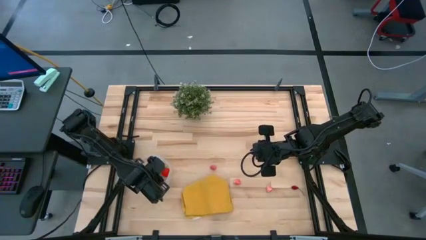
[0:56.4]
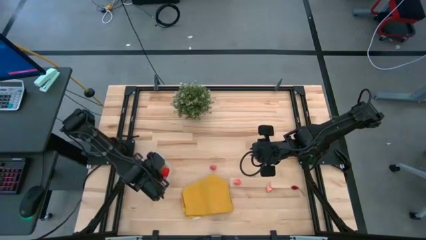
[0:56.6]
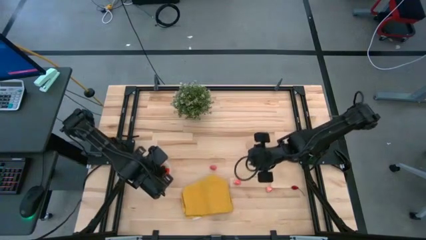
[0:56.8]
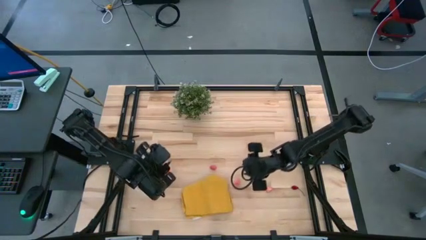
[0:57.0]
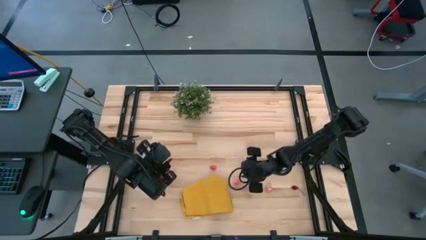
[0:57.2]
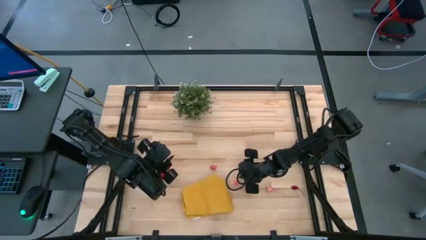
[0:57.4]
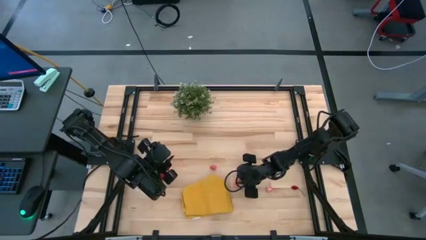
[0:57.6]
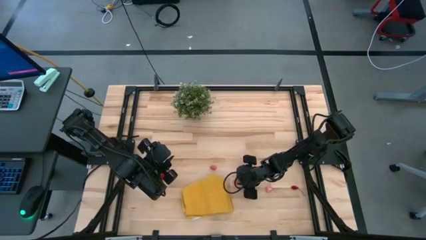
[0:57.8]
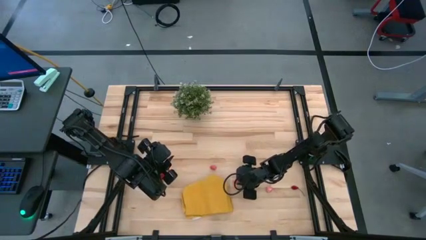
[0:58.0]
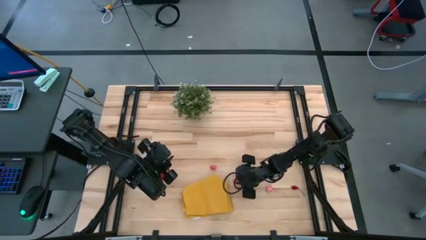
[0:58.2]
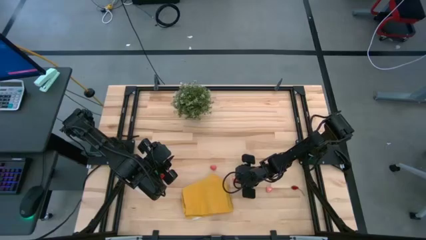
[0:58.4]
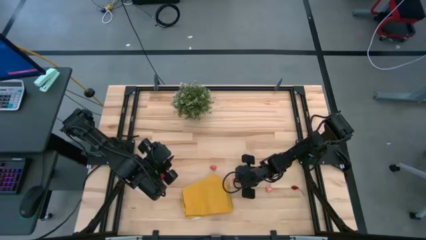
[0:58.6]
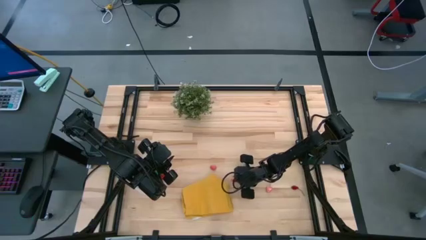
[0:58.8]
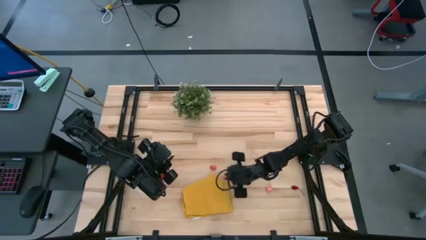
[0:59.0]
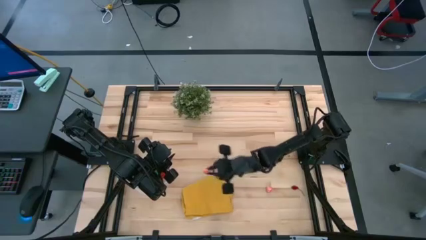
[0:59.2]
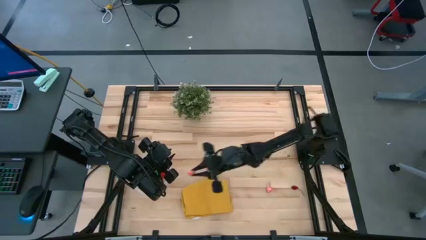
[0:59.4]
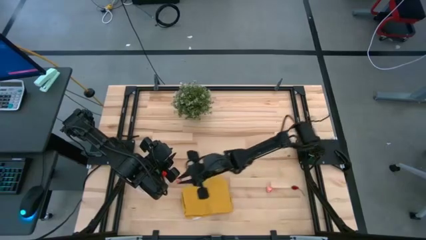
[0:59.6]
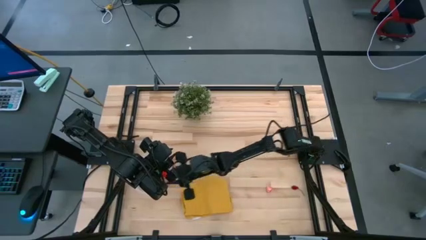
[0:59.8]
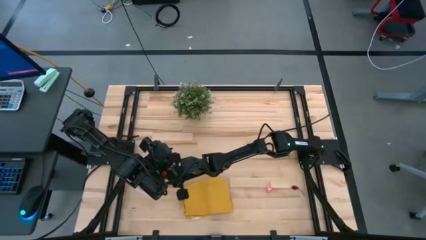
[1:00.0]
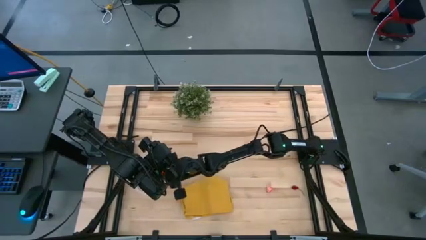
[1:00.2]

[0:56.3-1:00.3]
Task: Pick and placing Produce into tupperware
Put the peach into the transparent bin

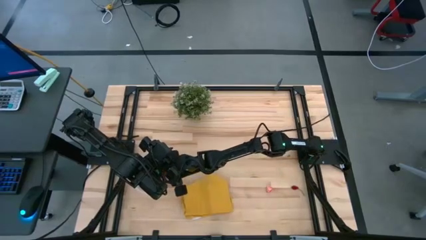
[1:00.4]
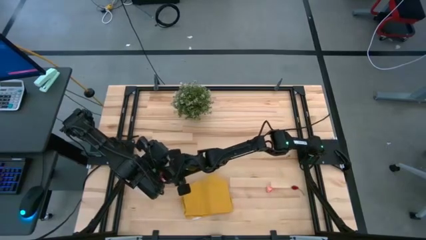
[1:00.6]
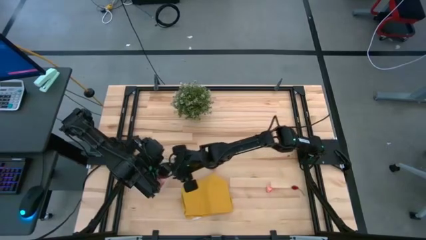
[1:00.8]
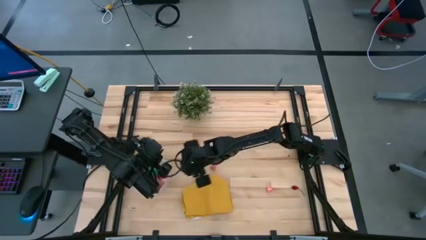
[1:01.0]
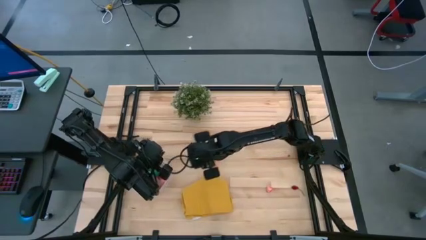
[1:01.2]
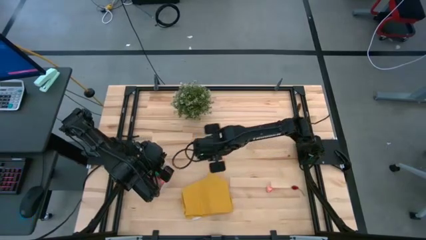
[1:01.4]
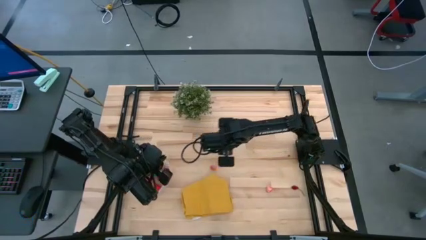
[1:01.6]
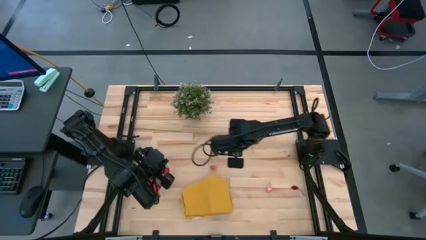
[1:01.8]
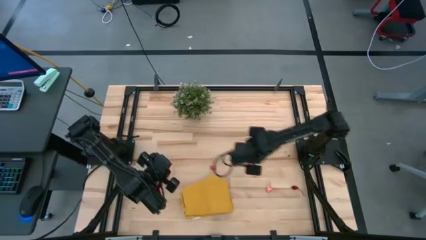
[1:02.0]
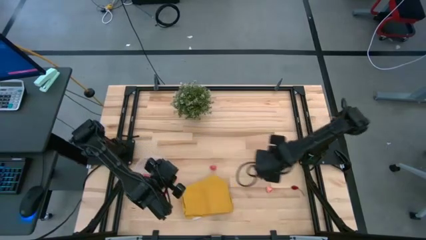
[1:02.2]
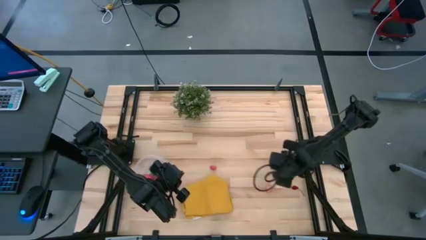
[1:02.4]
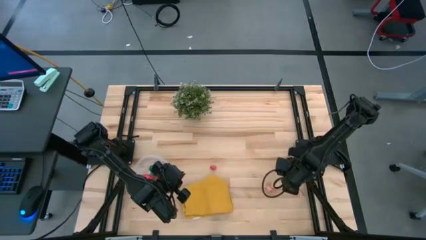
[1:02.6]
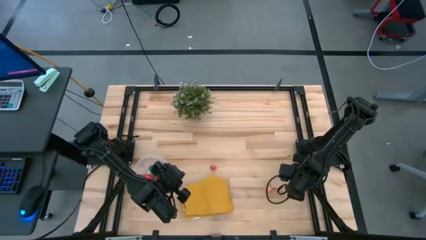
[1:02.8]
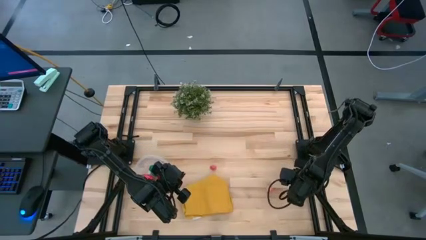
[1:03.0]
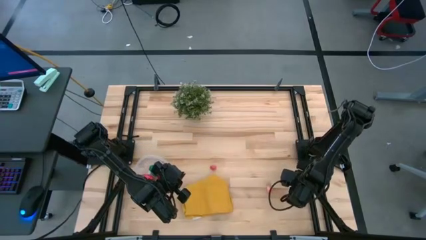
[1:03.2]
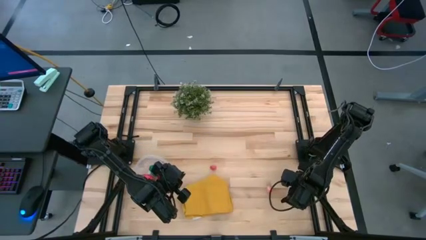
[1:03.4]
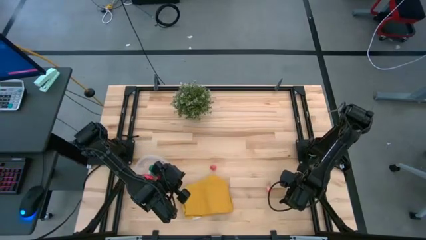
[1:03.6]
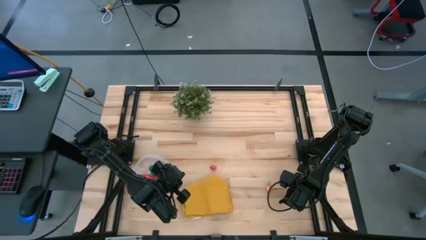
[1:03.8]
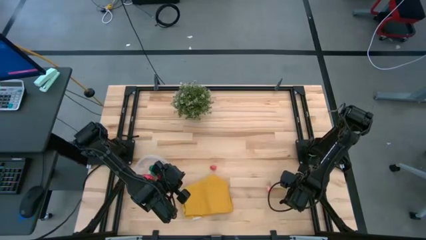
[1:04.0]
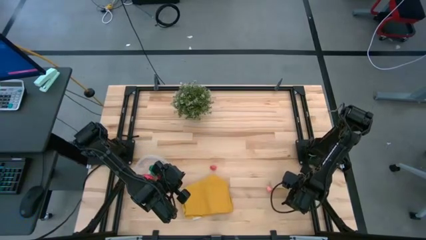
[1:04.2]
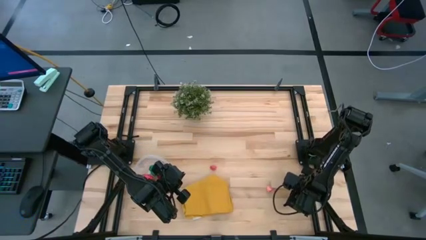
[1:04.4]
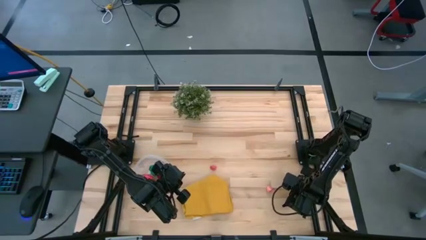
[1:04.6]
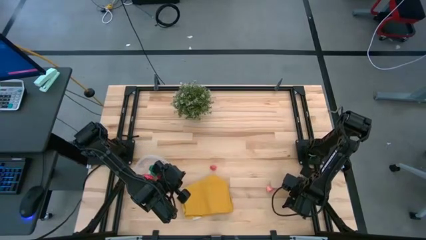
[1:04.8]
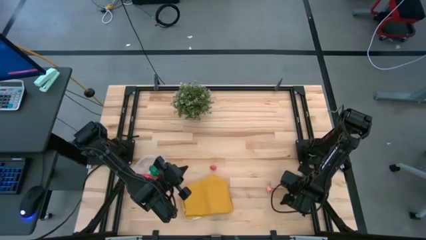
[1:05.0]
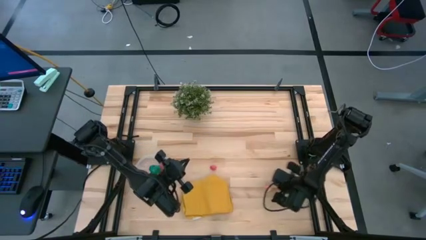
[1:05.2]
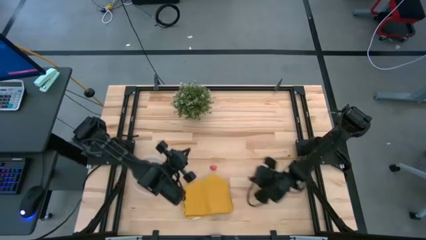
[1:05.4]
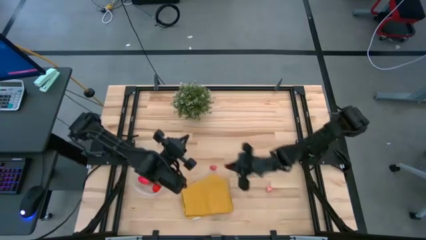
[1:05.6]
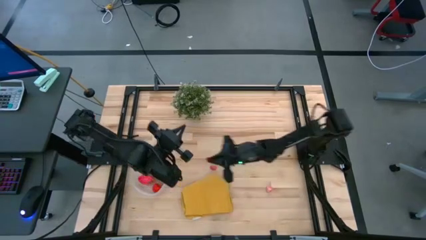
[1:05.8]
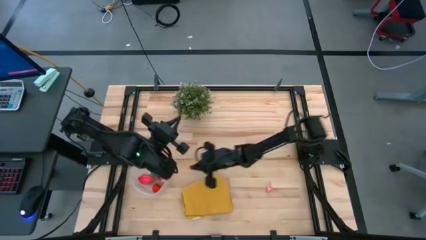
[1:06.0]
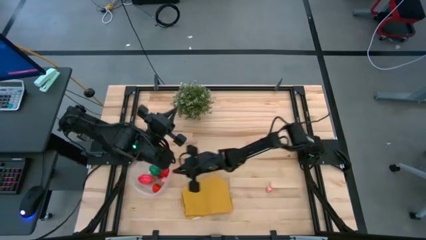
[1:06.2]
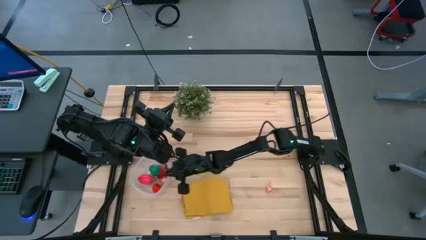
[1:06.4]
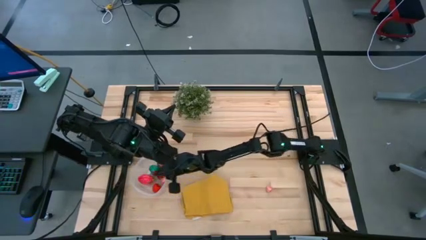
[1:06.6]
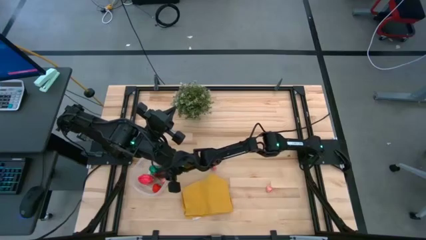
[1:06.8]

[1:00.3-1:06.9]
Put the cherry into the transparent bin

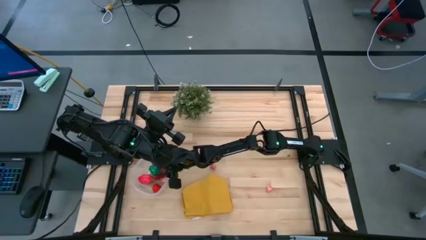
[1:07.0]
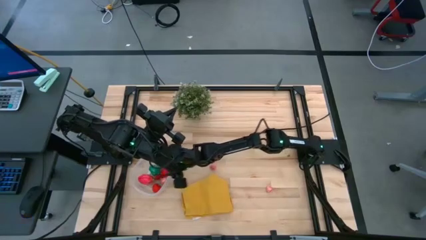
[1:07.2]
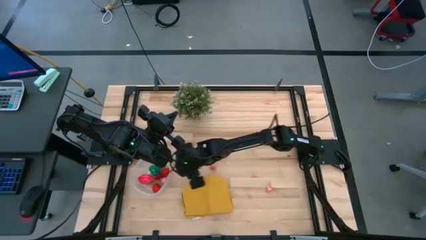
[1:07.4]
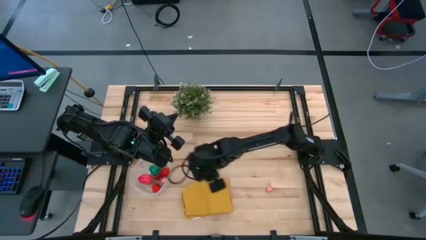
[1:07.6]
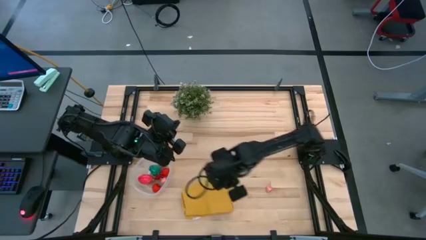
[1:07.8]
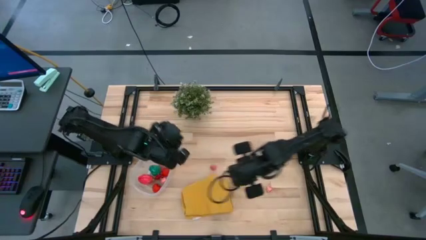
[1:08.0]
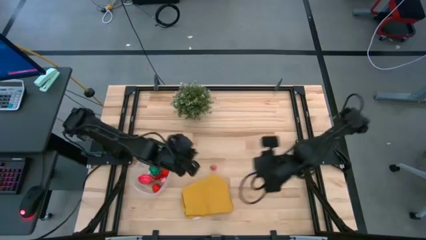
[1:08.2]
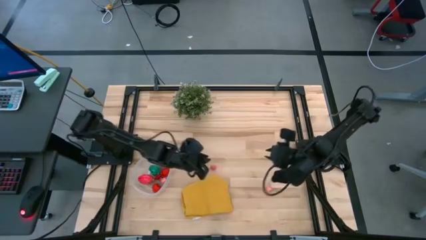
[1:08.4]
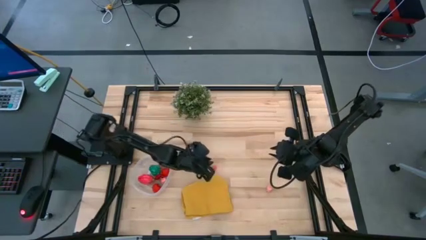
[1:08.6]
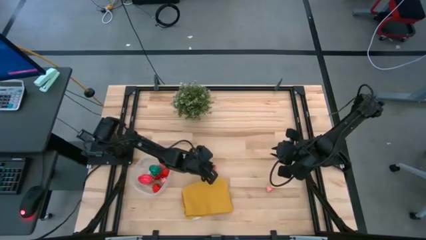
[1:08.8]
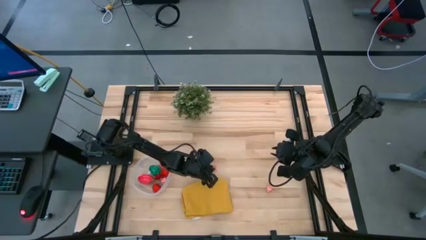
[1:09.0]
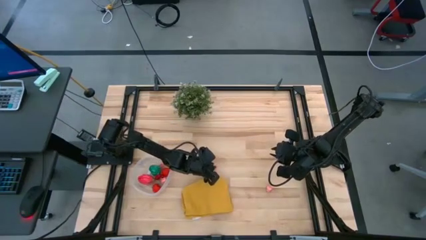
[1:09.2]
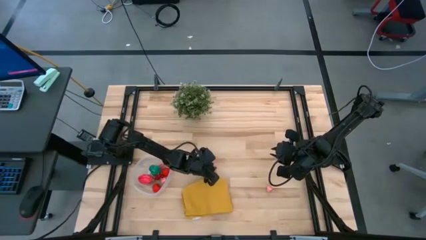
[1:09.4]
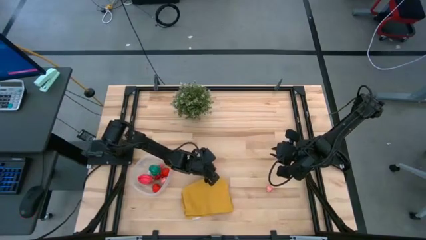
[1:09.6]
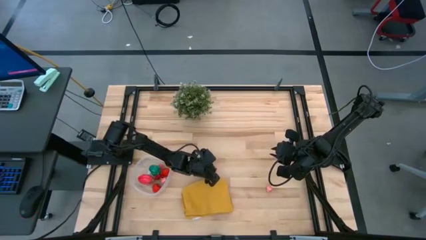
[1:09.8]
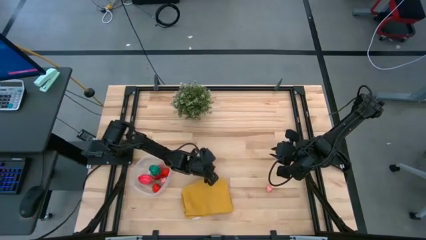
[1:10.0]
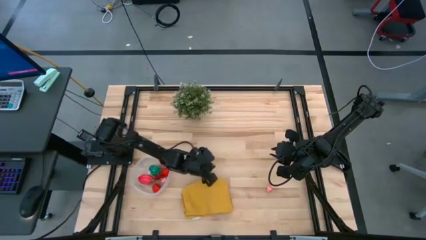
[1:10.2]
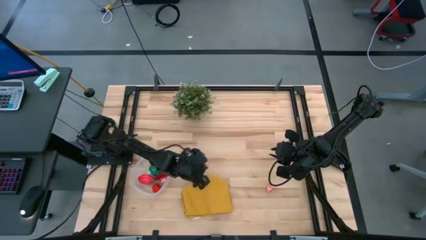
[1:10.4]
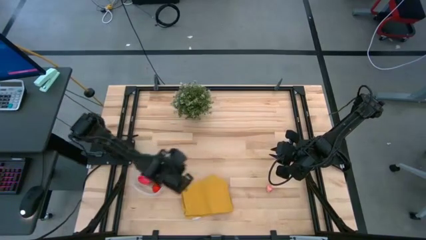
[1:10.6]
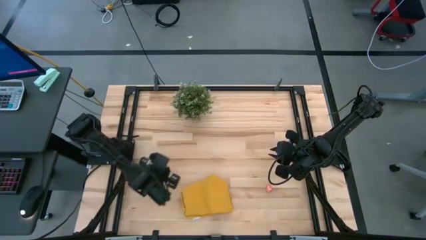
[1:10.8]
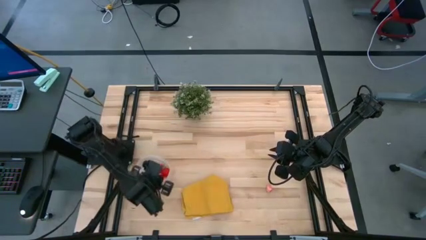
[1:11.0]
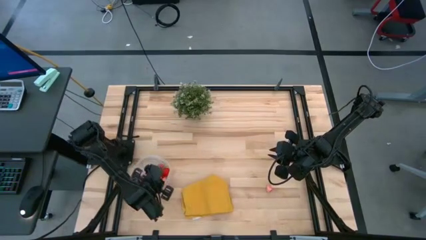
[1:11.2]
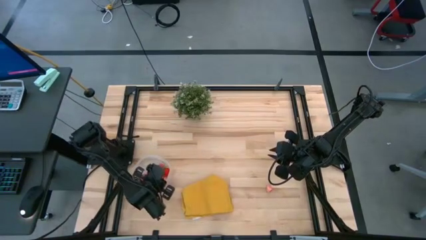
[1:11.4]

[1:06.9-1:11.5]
Put the peach into the transparent bin
